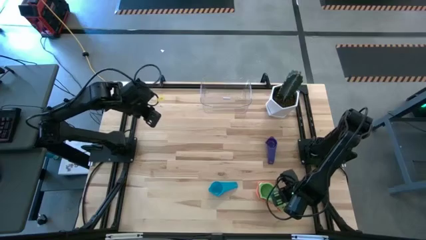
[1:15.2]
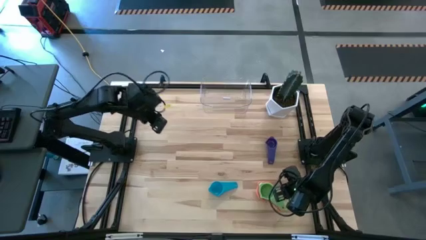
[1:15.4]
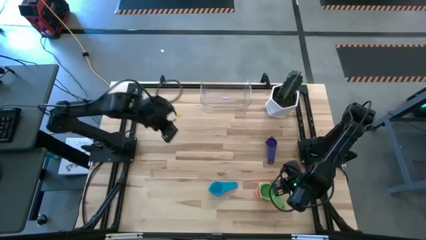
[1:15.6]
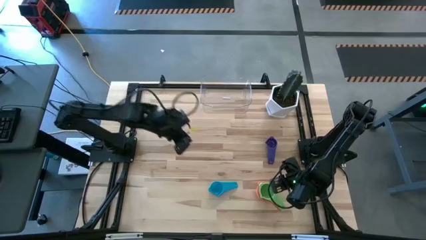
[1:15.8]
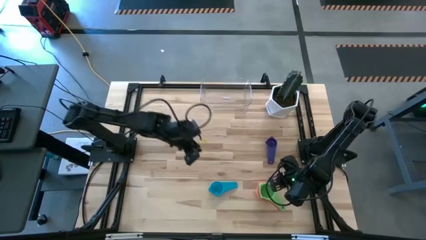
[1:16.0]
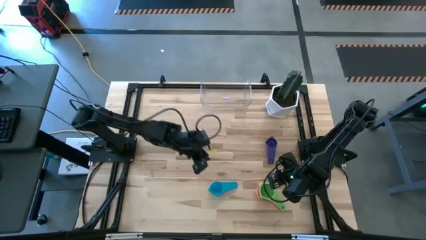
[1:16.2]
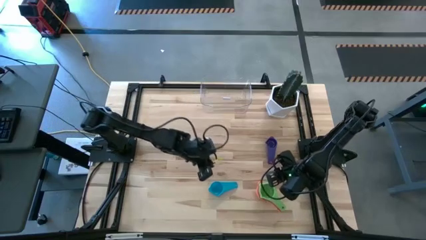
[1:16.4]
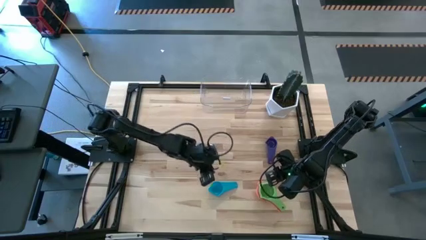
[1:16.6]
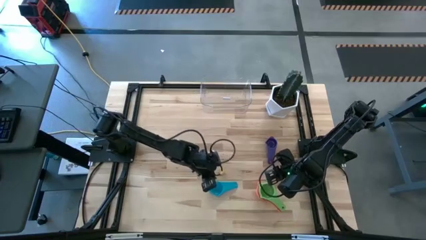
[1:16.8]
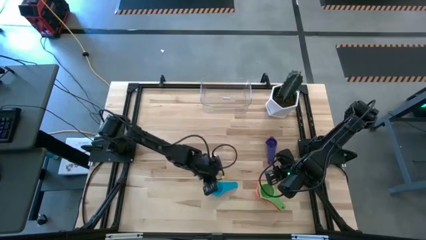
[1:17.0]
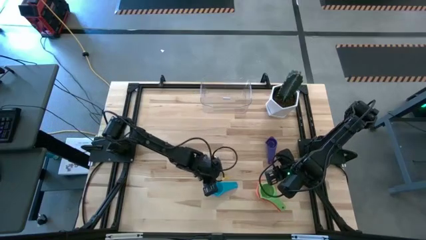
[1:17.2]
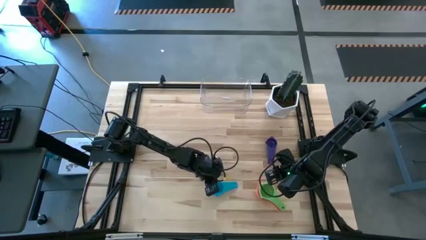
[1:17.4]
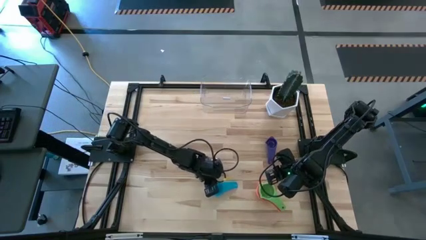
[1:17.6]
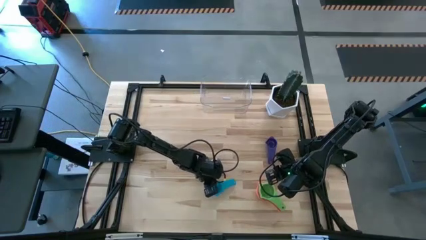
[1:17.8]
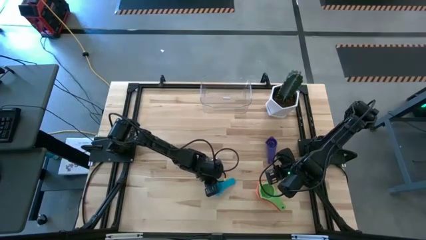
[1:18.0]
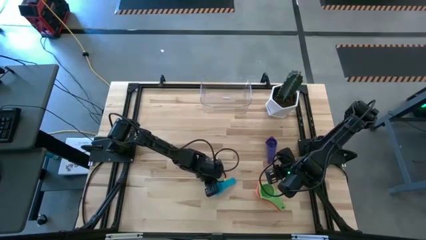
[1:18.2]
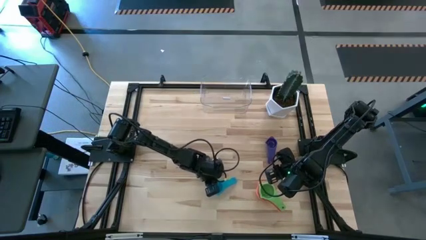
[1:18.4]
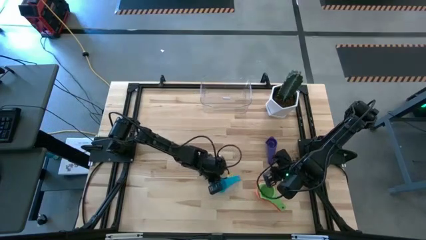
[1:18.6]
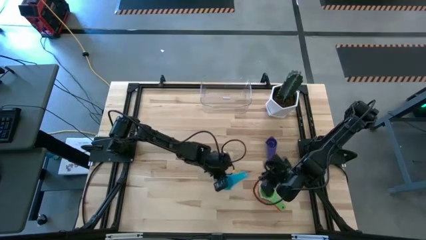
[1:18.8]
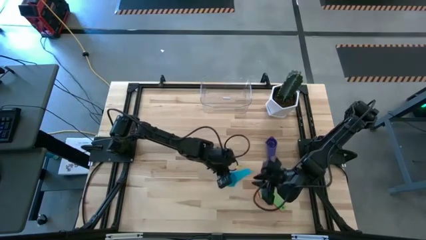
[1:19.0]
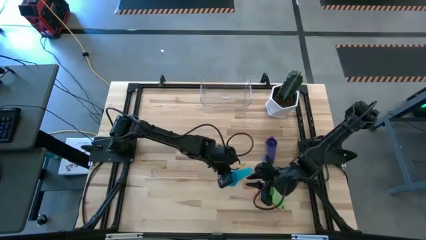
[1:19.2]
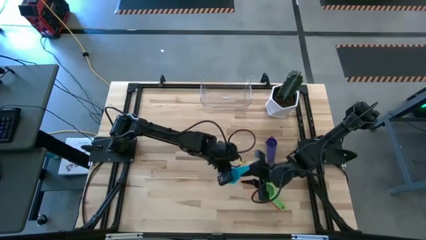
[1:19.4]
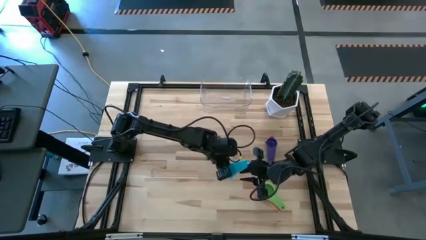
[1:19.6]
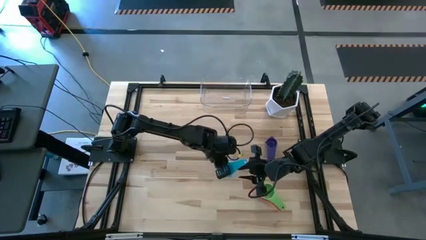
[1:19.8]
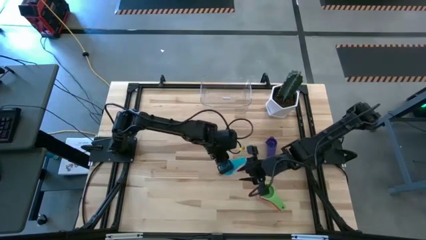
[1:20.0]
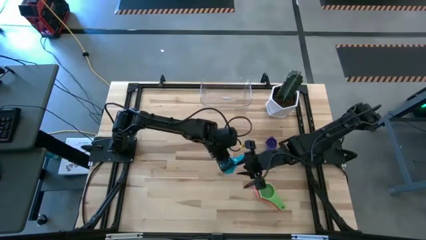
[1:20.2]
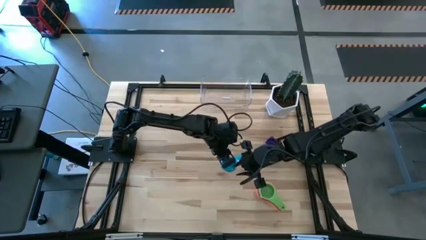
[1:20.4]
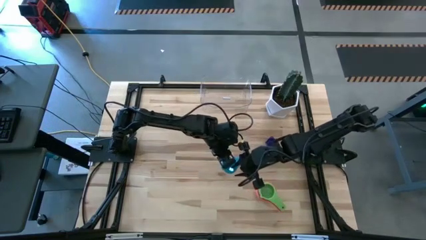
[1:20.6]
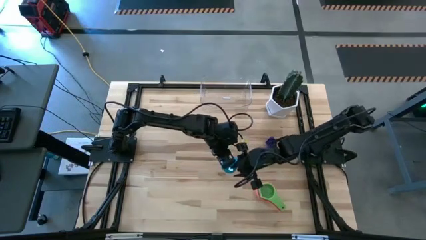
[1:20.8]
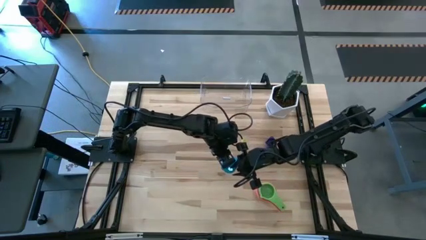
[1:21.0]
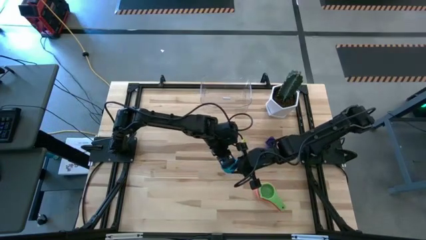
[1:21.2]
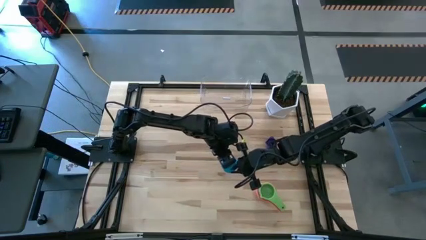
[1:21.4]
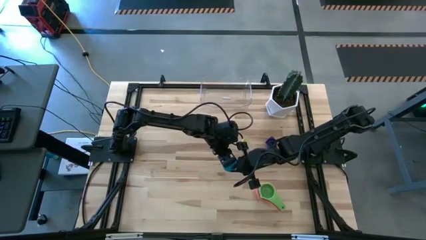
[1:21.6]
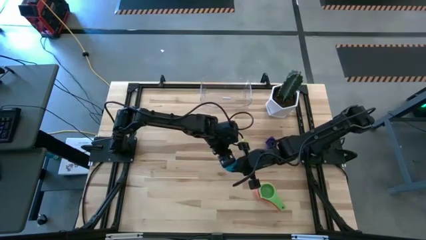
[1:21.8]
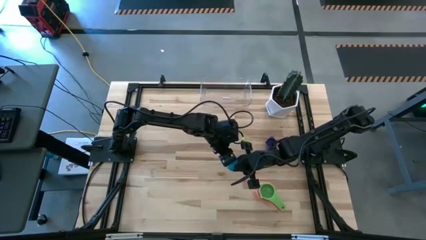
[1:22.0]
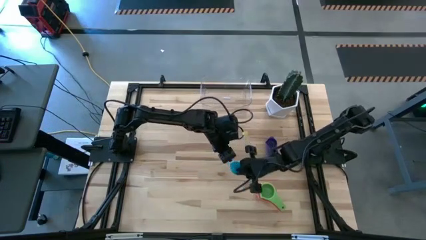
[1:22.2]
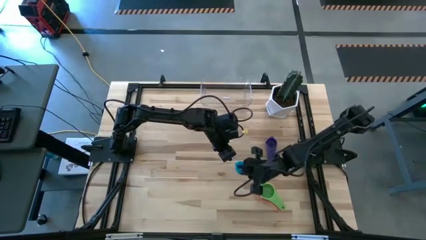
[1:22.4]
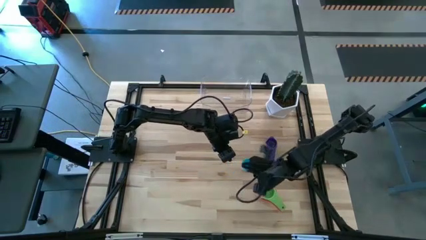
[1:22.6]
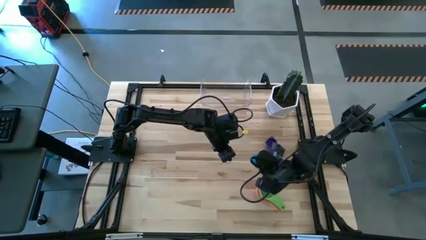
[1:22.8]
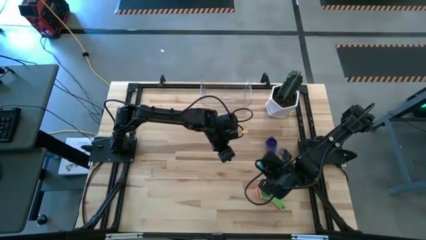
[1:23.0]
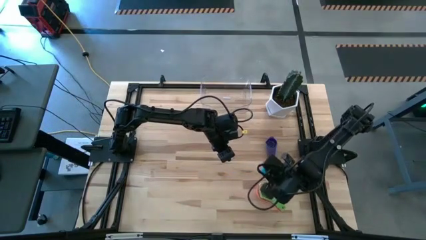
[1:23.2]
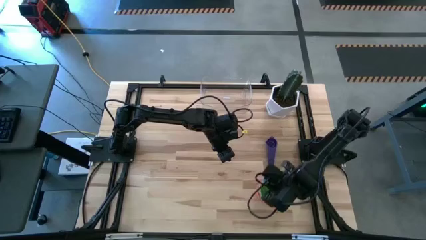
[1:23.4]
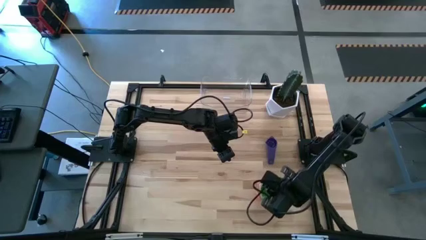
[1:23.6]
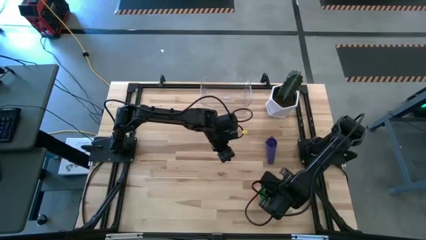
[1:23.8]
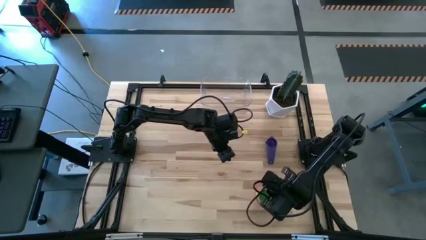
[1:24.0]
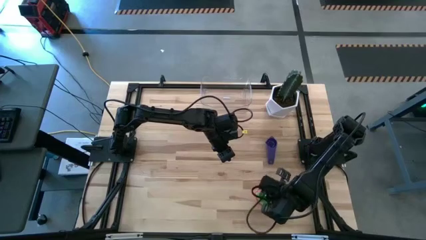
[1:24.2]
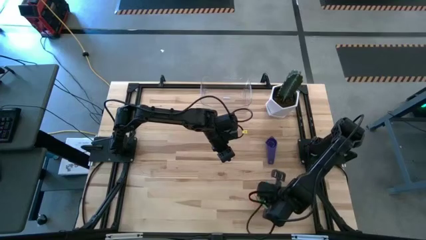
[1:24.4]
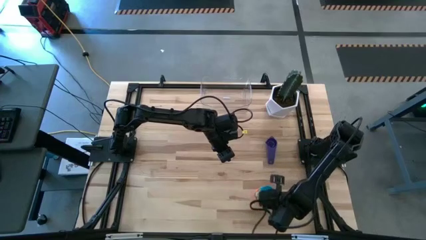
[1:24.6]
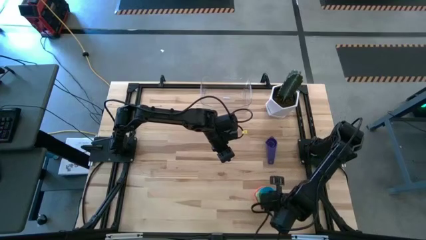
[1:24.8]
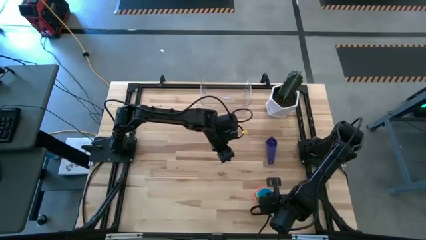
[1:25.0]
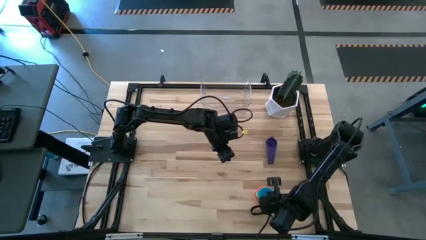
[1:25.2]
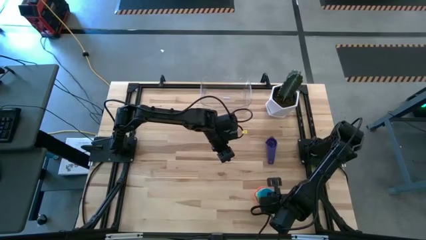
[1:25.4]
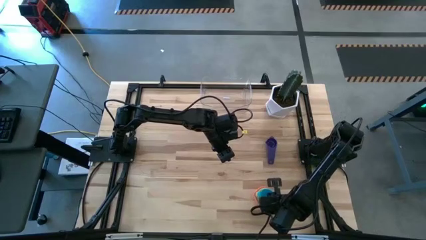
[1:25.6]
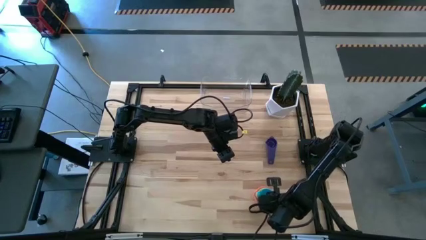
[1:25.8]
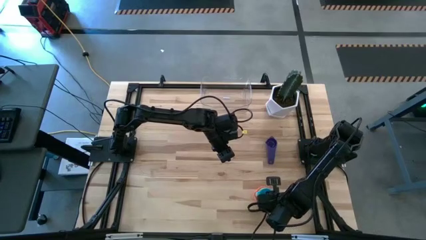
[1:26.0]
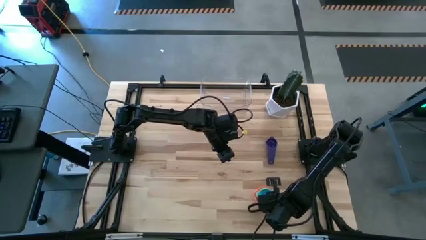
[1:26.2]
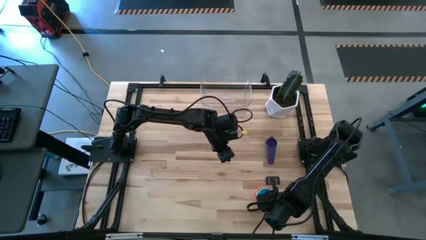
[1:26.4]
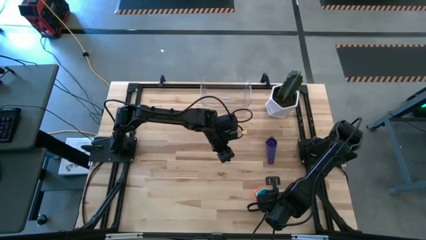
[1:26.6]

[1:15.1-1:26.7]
Task: Nest measuring cups in basket
Stack the light blue measuring cup on top of the green measuring cup

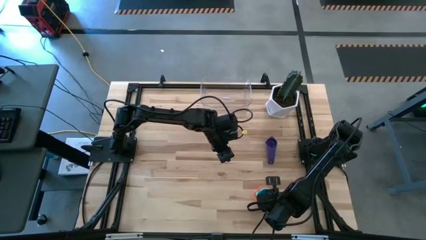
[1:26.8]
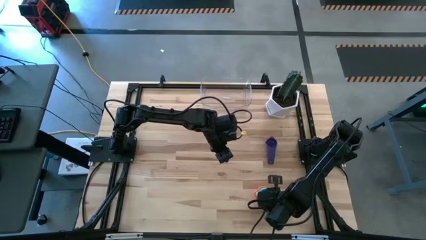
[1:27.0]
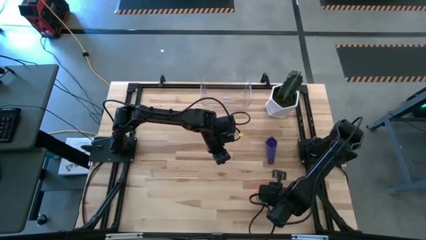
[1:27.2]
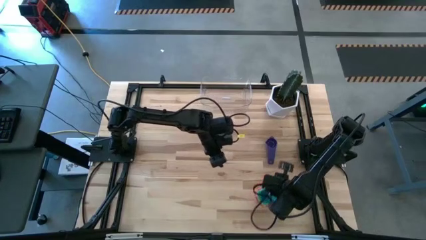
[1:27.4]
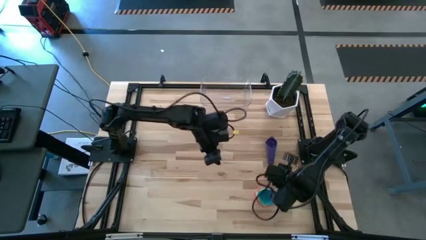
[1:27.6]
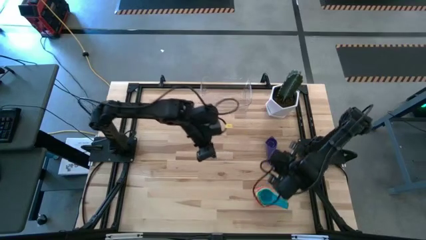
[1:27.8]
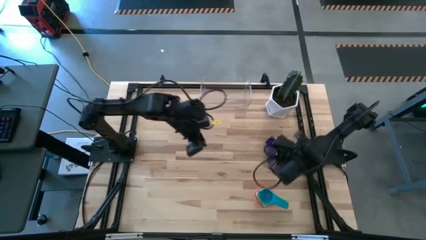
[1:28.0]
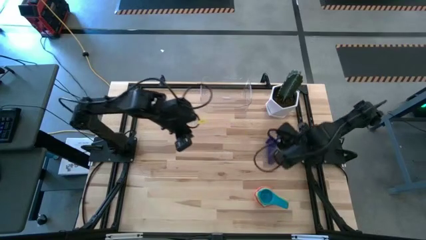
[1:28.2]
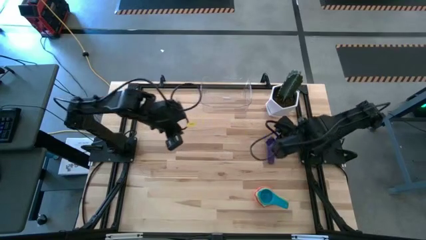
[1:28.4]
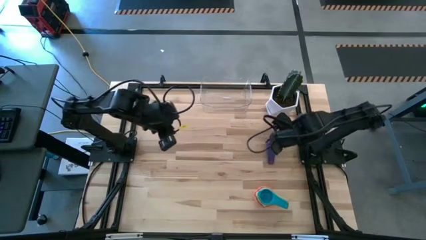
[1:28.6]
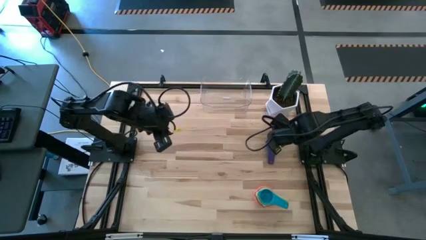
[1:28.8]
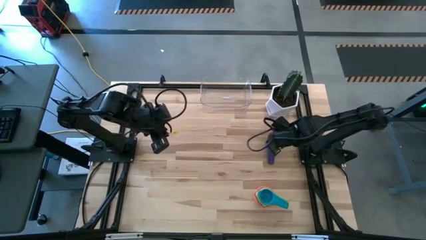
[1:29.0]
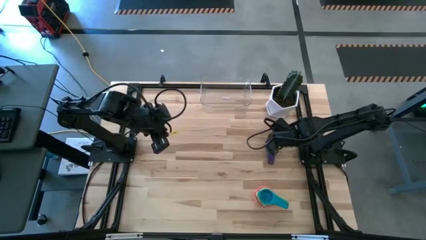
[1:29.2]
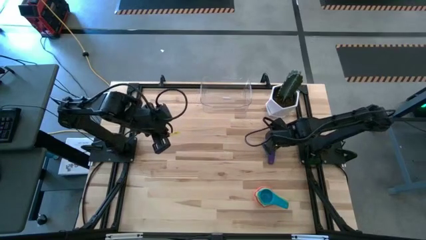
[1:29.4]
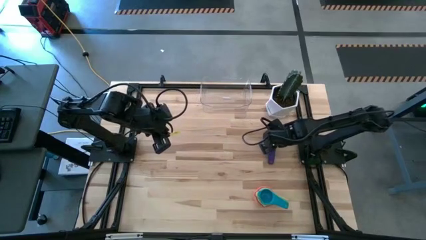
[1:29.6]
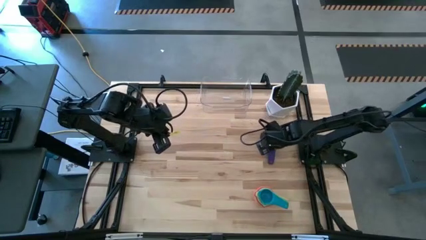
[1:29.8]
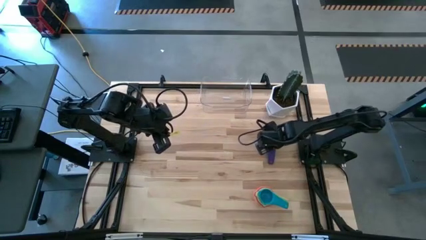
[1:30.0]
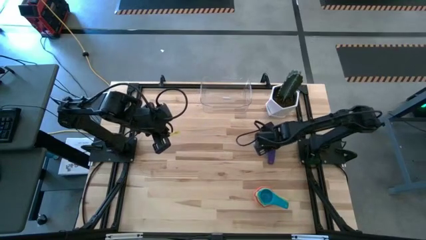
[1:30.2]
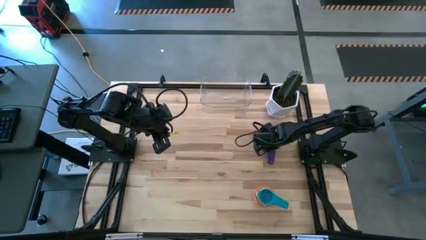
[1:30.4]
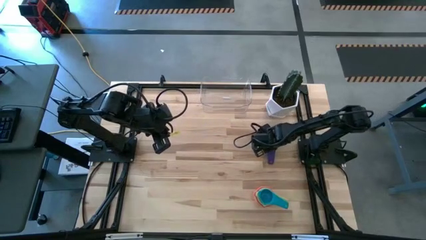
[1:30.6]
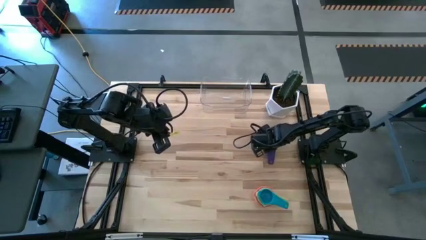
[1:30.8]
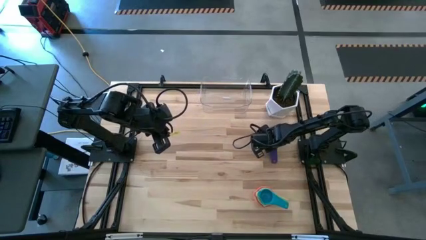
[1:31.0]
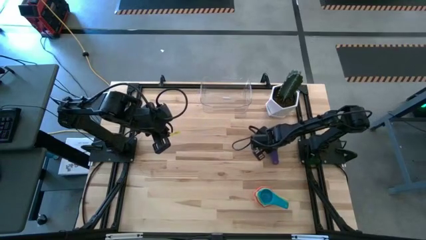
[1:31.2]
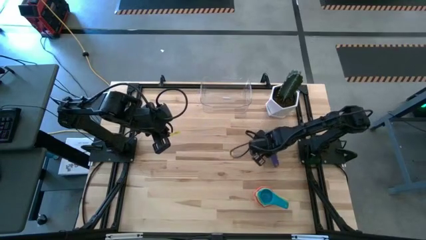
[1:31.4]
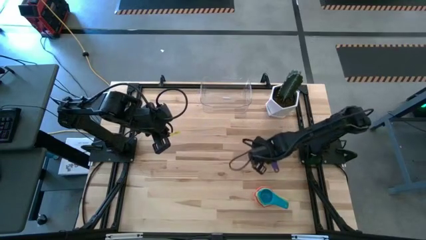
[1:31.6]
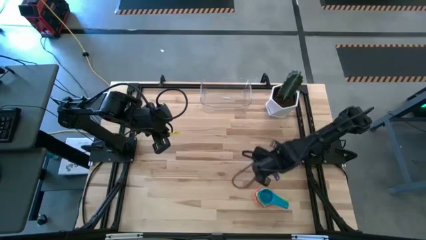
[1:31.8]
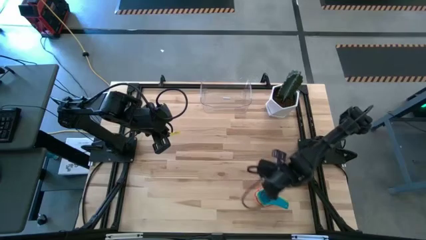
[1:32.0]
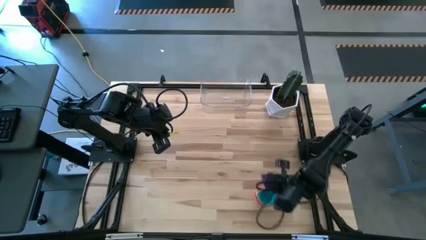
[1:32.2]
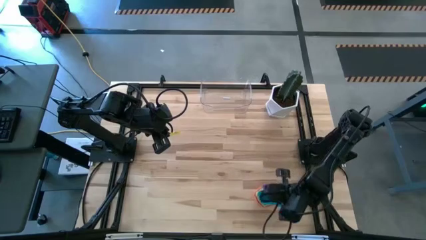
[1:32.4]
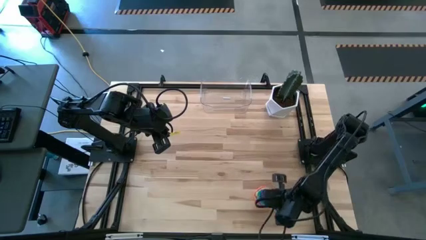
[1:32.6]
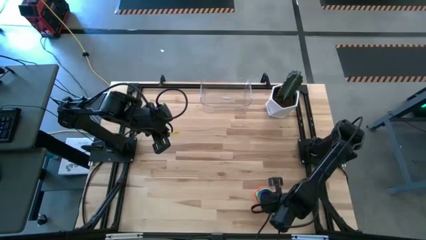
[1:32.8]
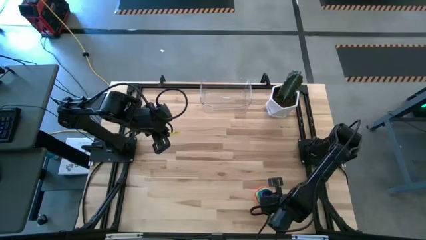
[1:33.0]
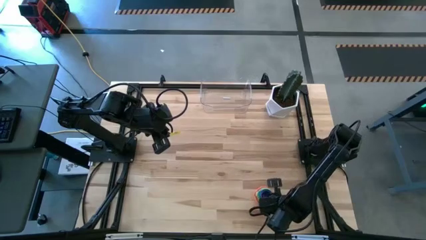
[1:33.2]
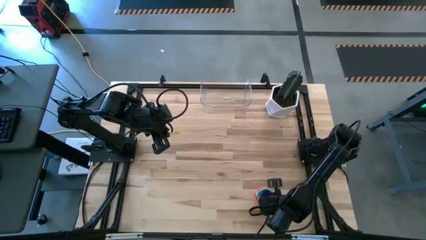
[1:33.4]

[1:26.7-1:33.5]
Stack the purple measuring cup on top of the light blue measuring cup
